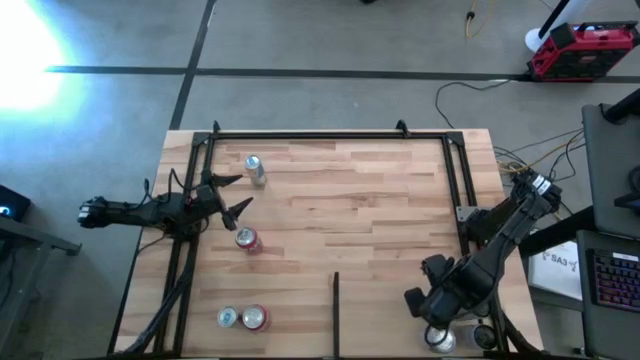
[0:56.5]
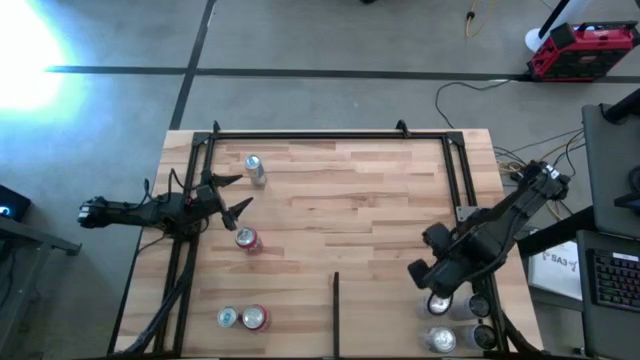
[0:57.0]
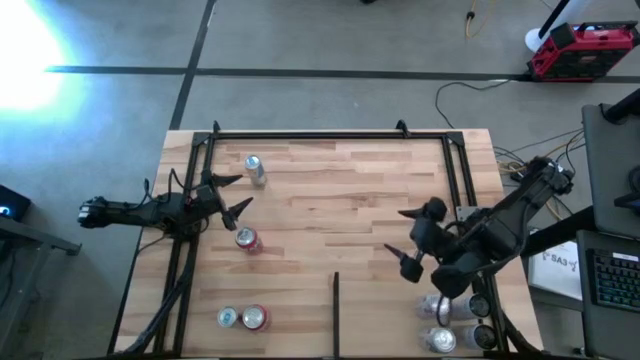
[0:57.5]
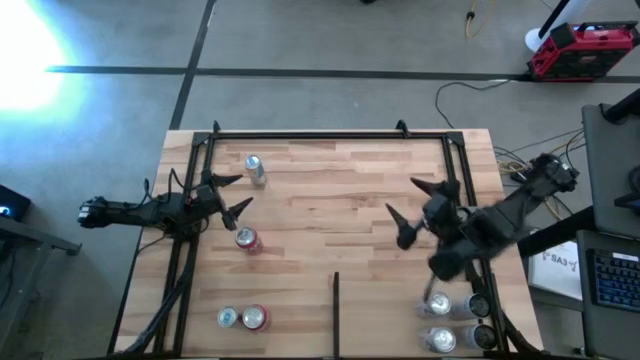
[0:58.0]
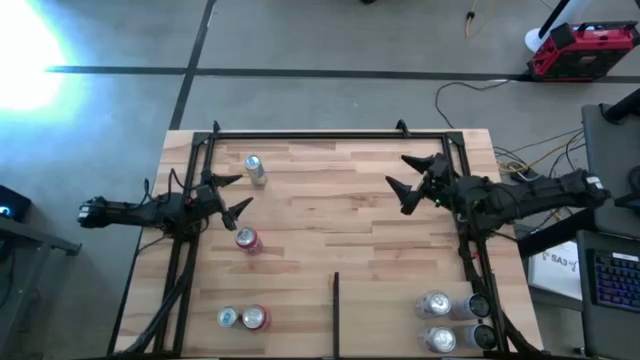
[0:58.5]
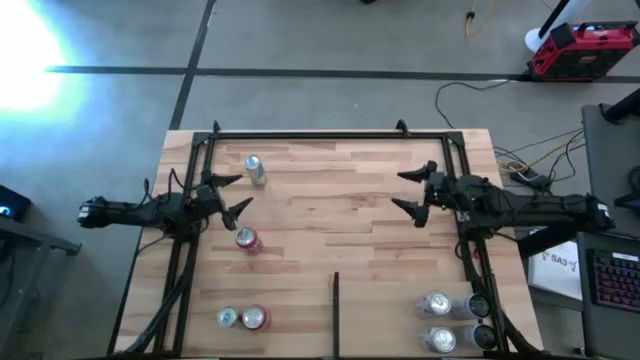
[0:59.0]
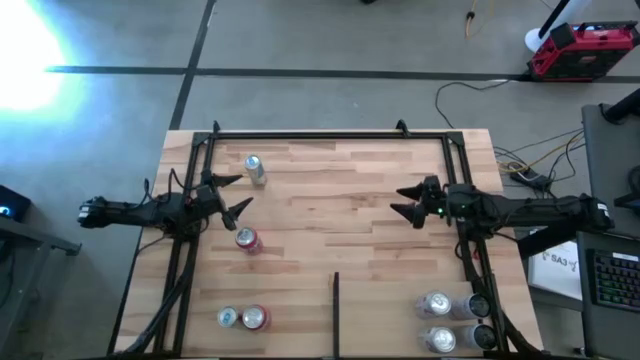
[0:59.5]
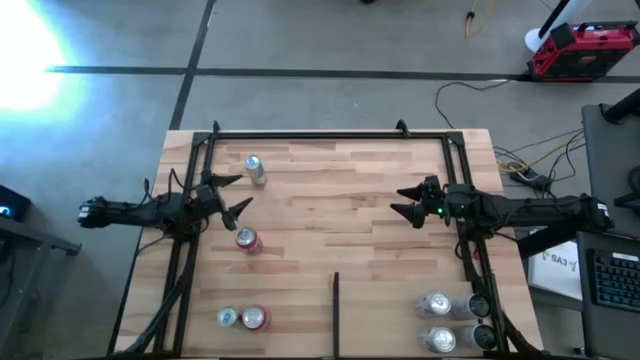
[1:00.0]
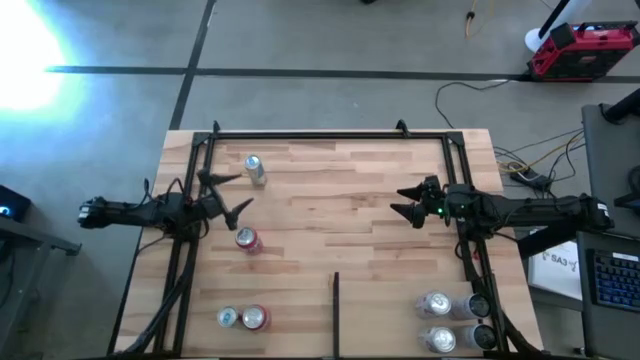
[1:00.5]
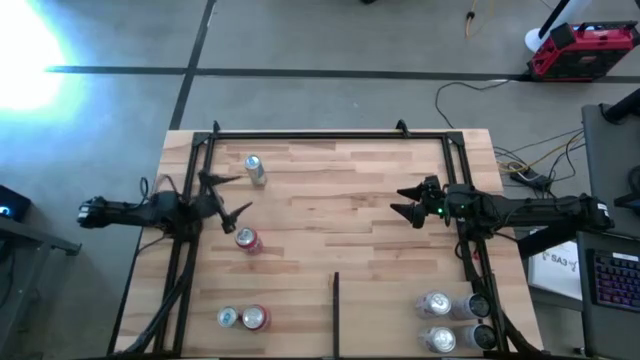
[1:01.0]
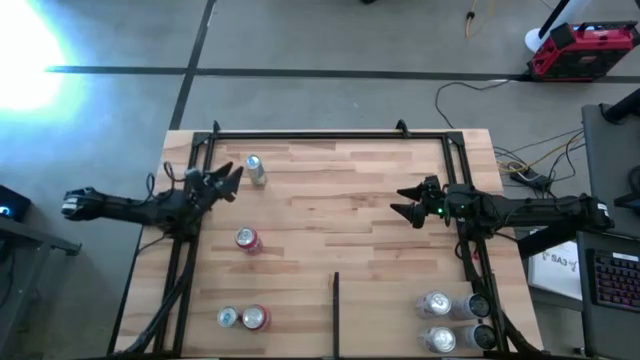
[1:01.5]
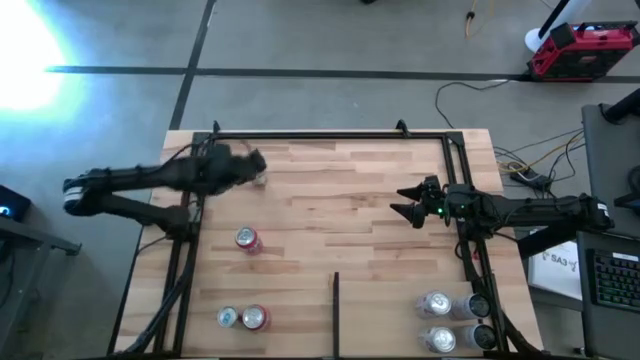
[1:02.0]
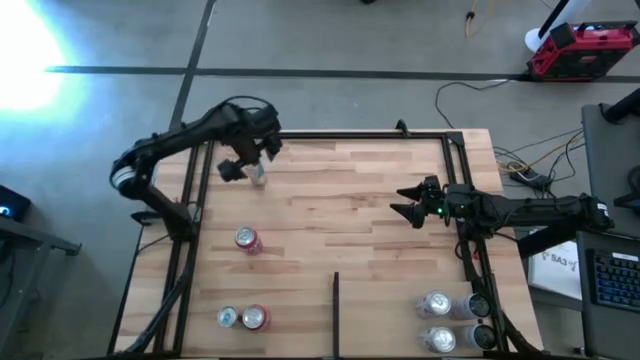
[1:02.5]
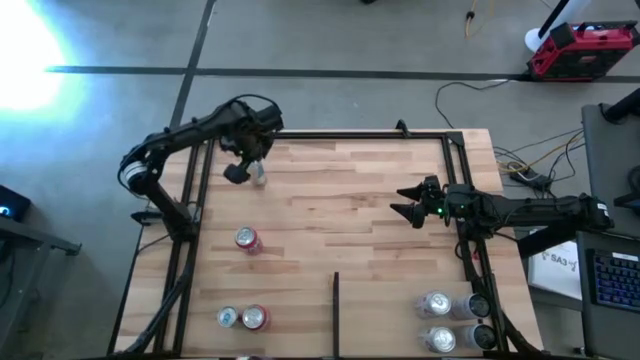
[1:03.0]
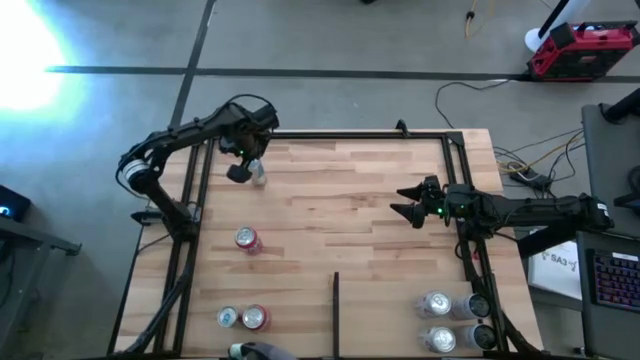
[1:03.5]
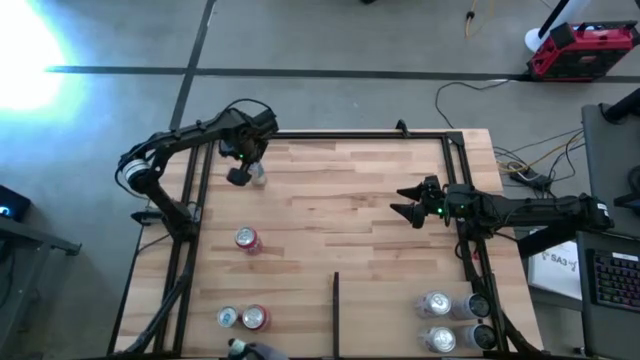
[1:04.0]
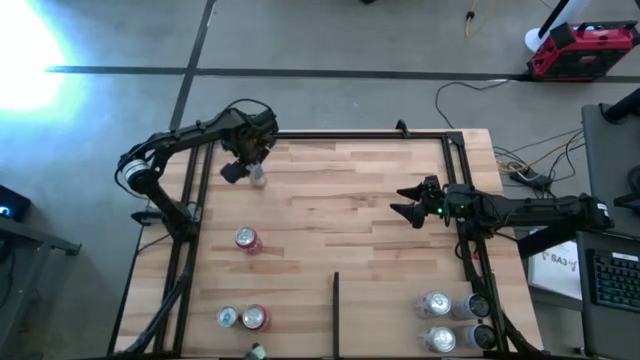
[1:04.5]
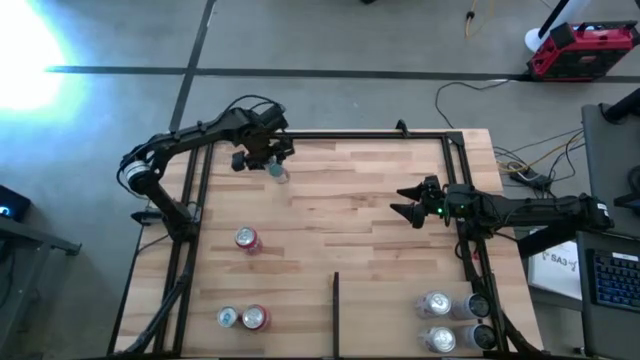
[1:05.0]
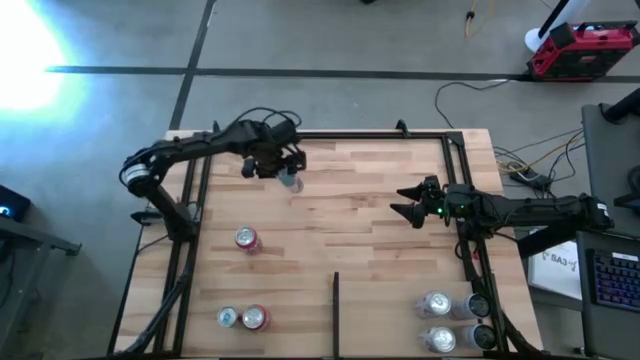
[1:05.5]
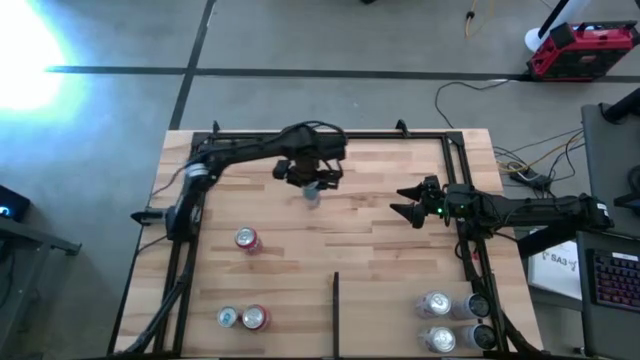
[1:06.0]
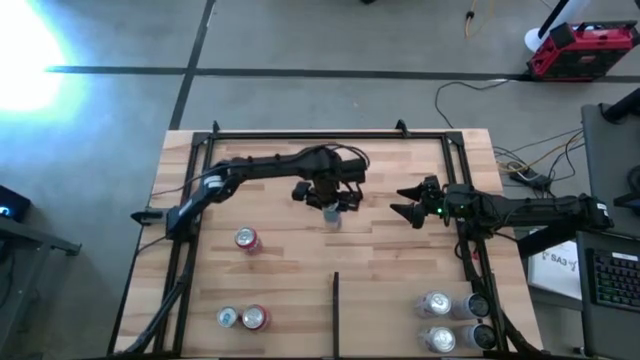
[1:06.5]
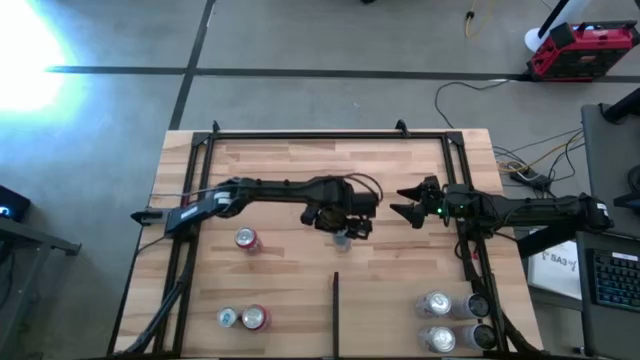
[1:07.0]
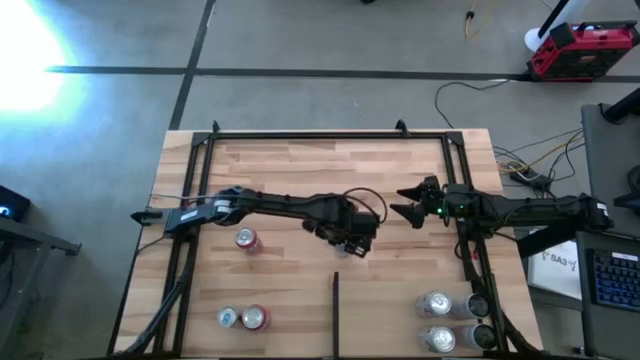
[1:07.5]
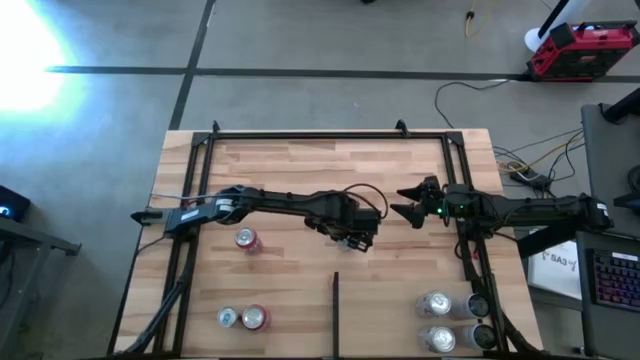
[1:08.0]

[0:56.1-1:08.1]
Task: Place canned beverage on shelf
Move the top white/blue soda can to the center of the table

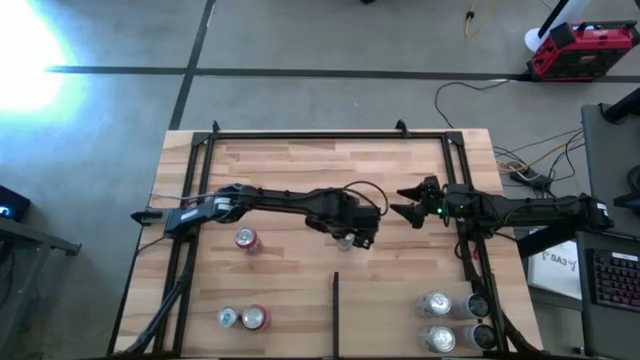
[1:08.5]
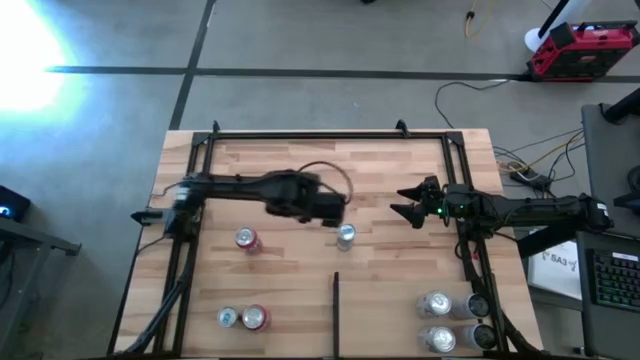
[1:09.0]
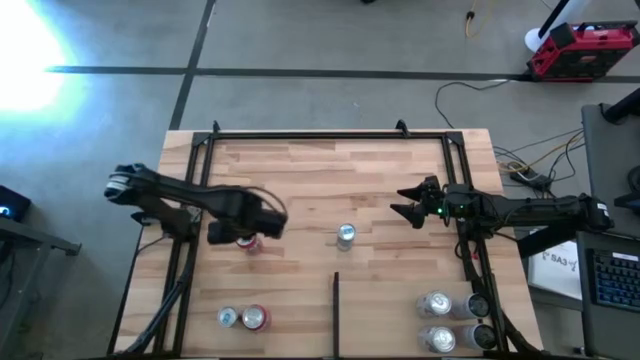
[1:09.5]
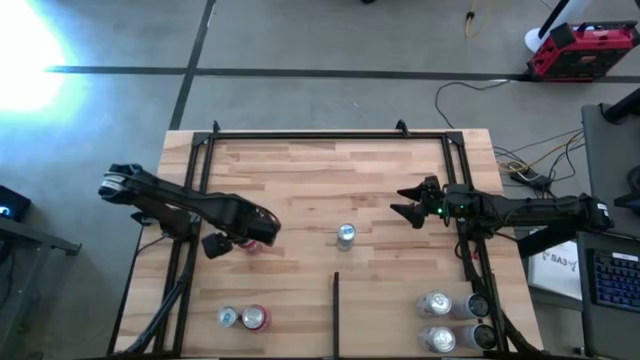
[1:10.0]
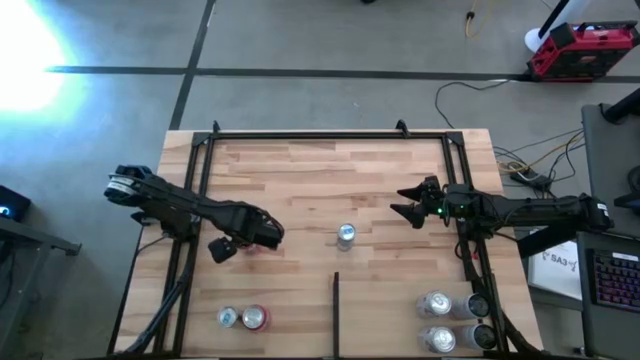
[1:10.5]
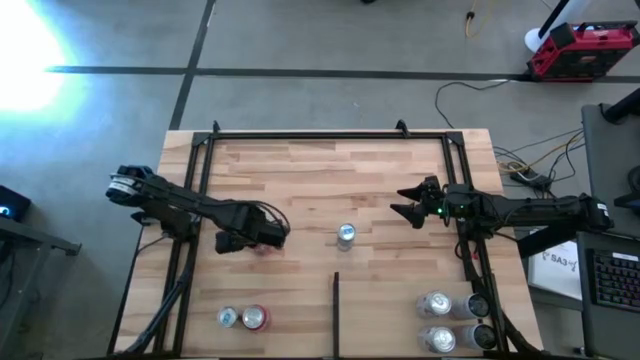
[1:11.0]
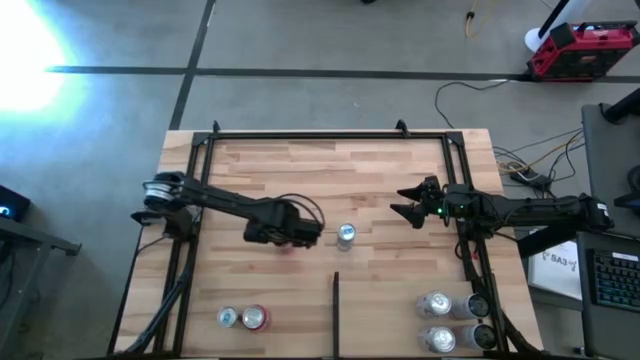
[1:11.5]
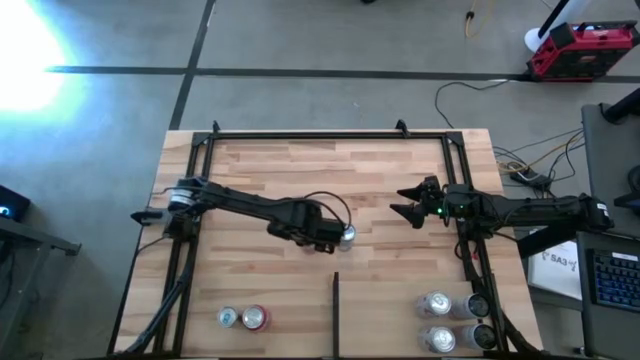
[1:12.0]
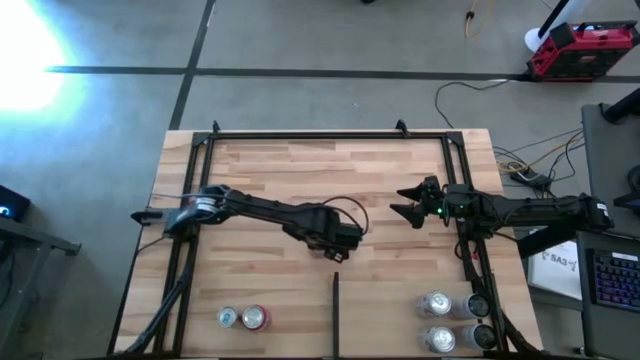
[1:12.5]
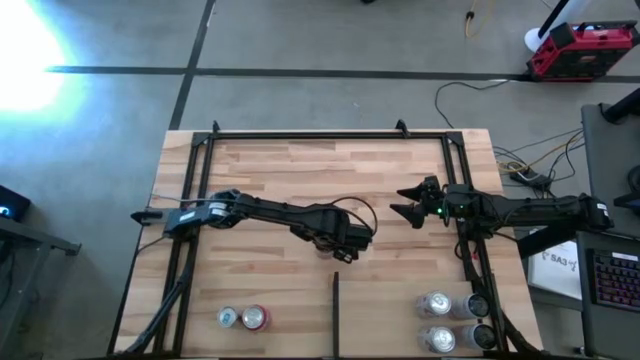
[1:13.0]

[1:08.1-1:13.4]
Move the top orange soda can to the center of the table

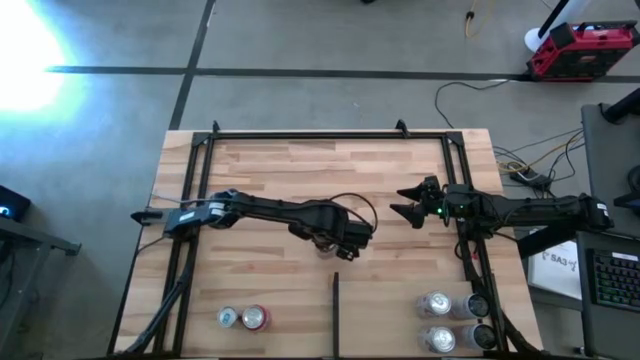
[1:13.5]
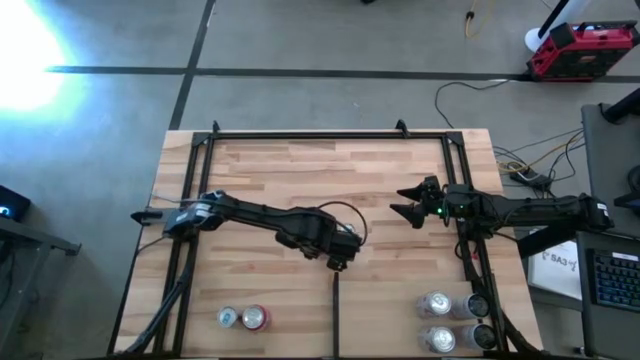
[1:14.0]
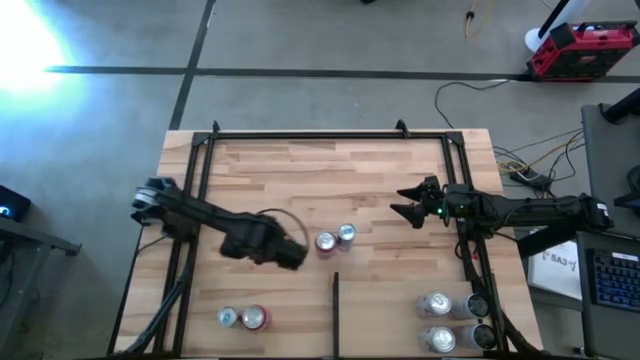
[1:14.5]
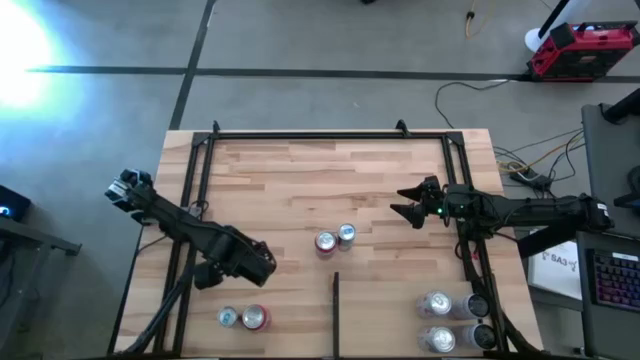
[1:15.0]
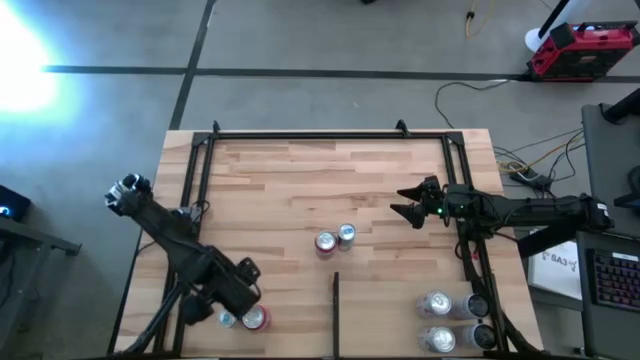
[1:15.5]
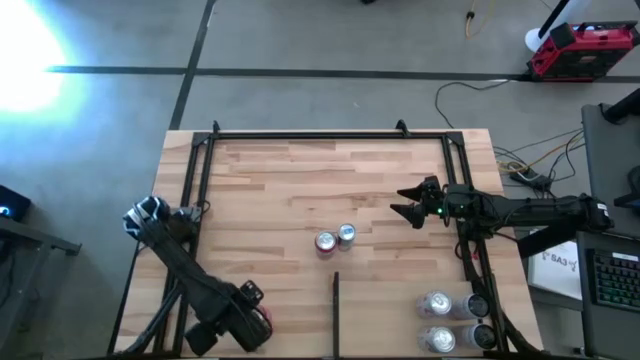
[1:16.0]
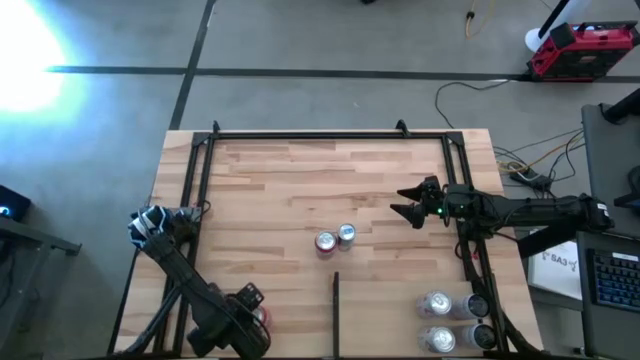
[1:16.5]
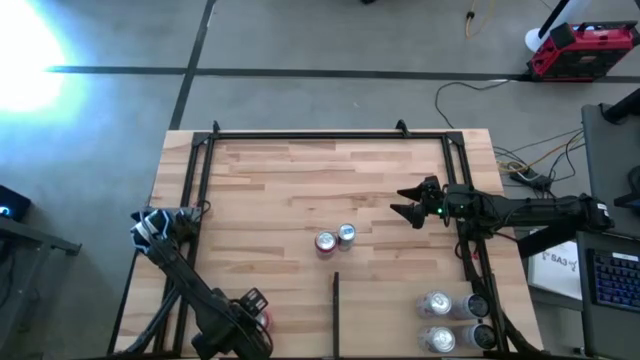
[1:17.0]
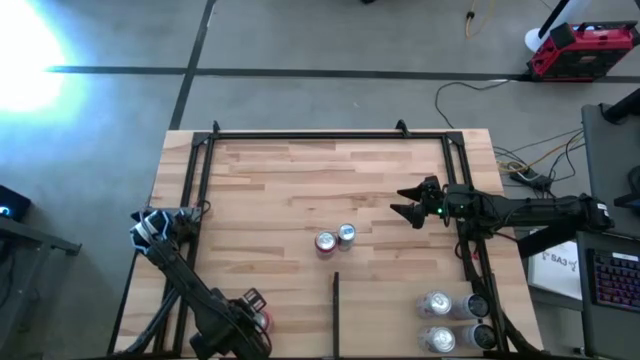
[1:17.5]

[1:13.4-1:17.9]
Move the bottom white/blue soda can to the center of the table

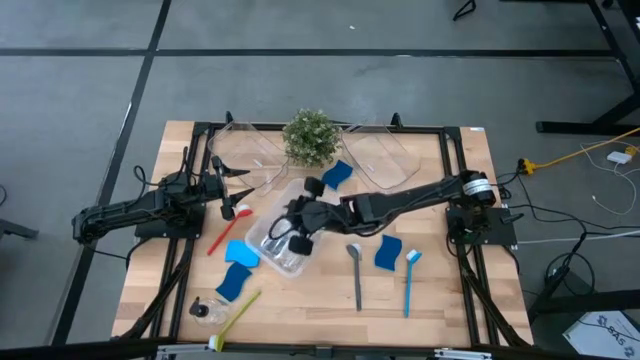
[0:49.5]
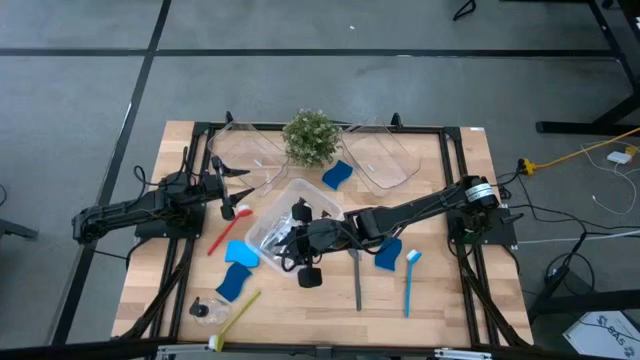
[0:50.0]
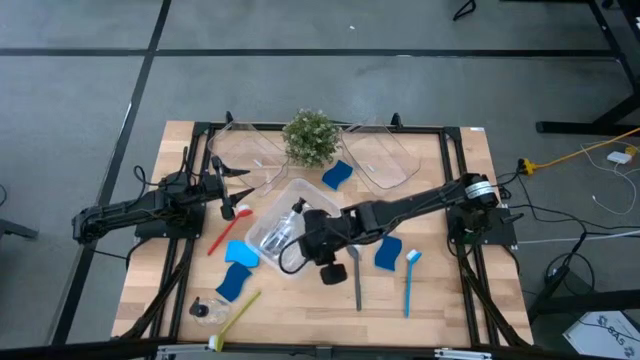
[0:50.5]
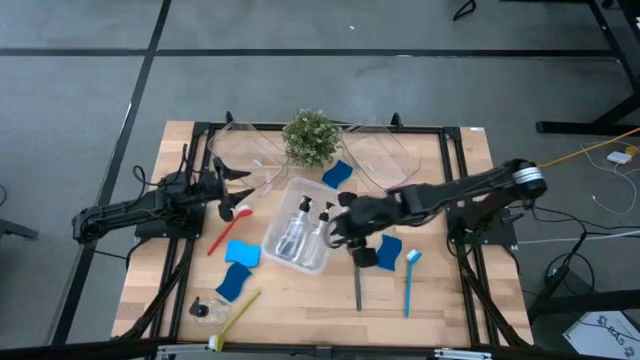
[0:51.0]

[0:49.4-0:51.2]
Task: Pick & Place Kitchen Sink Supplies
Adjust the white bin
